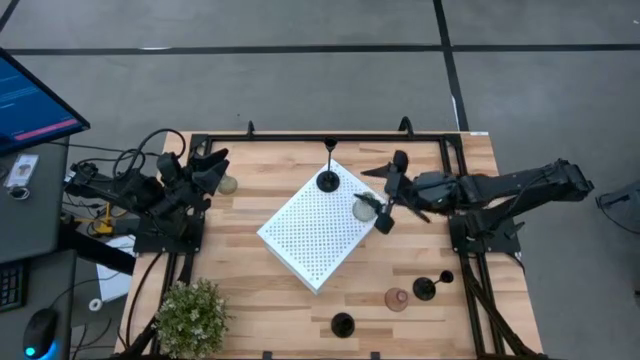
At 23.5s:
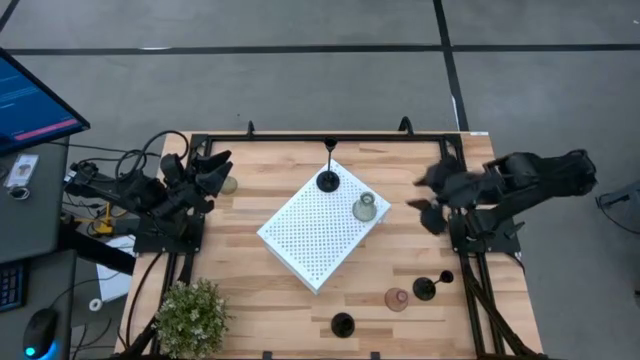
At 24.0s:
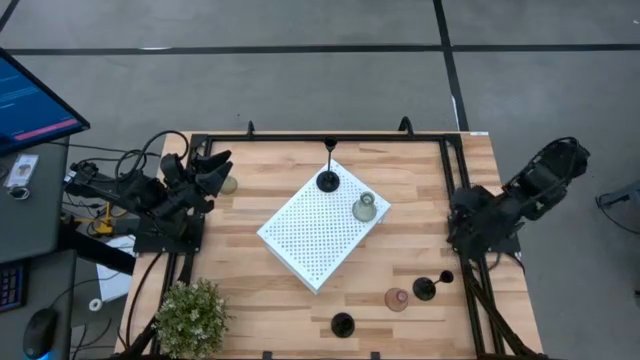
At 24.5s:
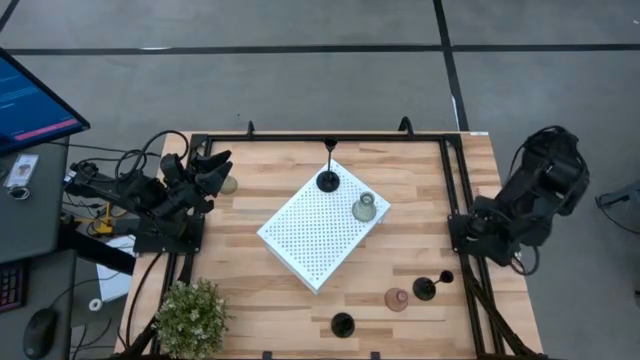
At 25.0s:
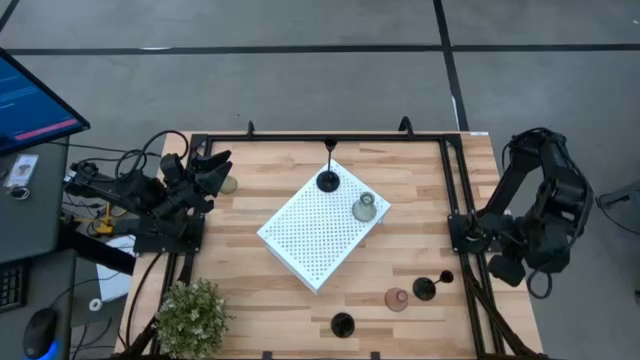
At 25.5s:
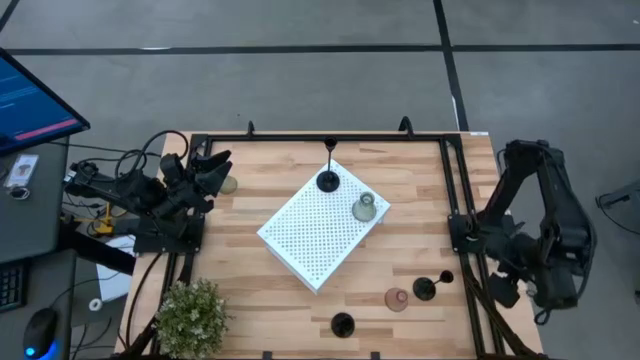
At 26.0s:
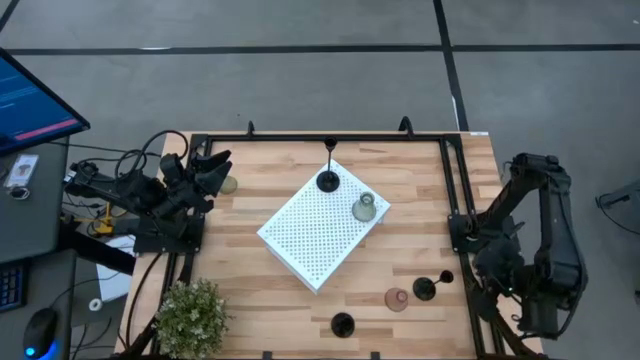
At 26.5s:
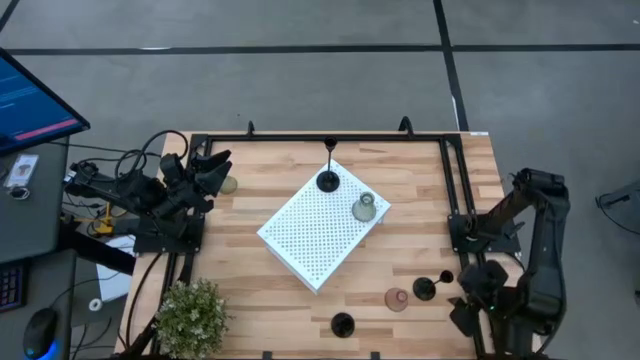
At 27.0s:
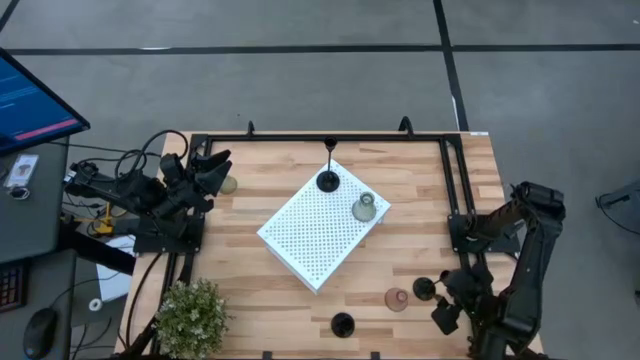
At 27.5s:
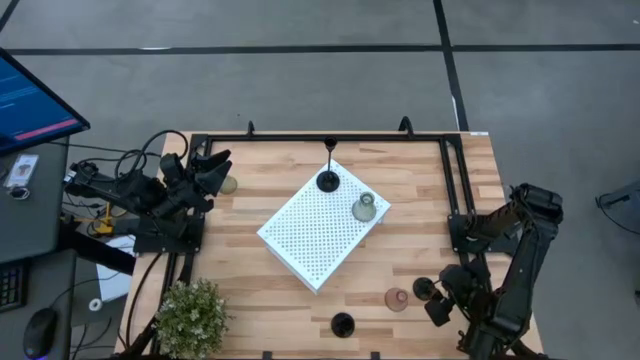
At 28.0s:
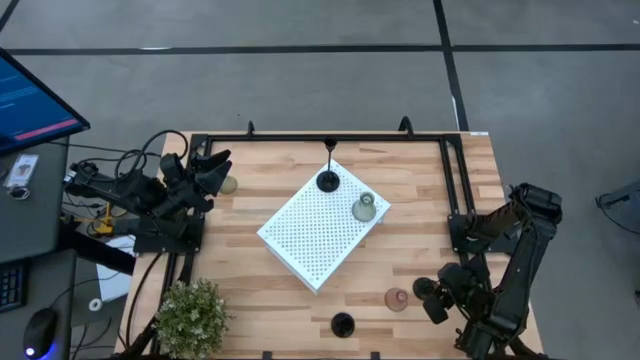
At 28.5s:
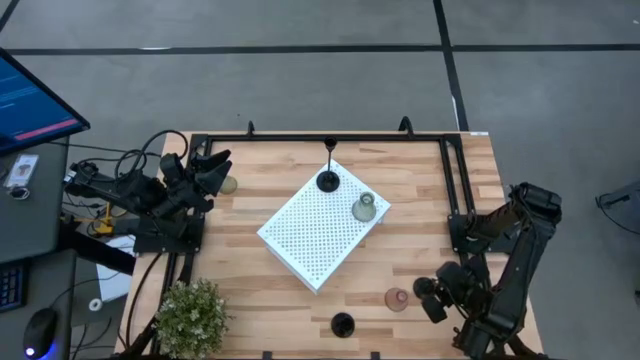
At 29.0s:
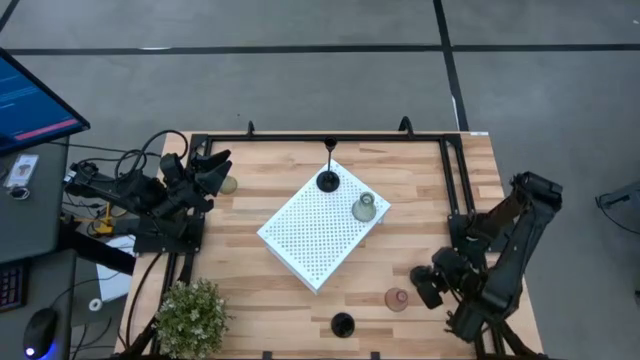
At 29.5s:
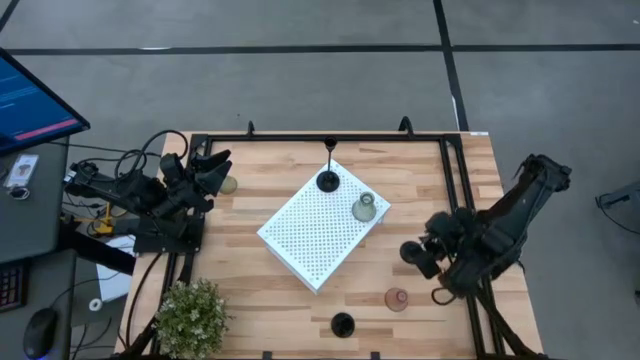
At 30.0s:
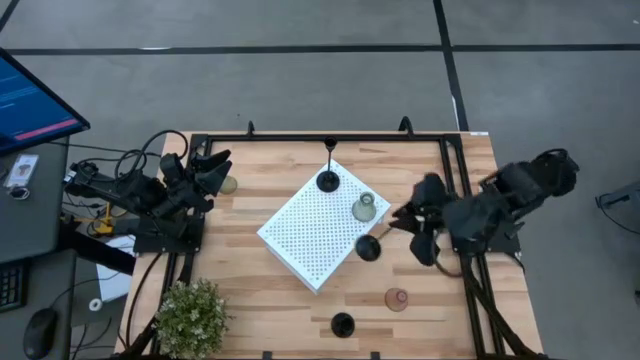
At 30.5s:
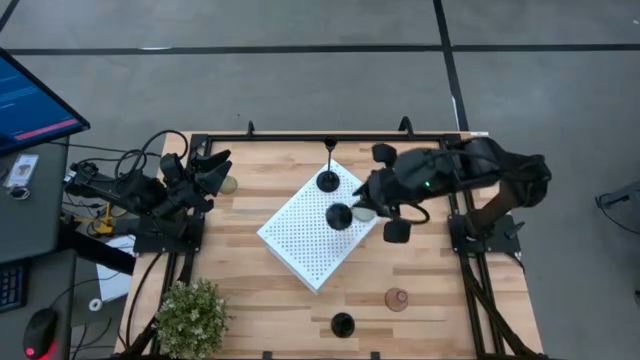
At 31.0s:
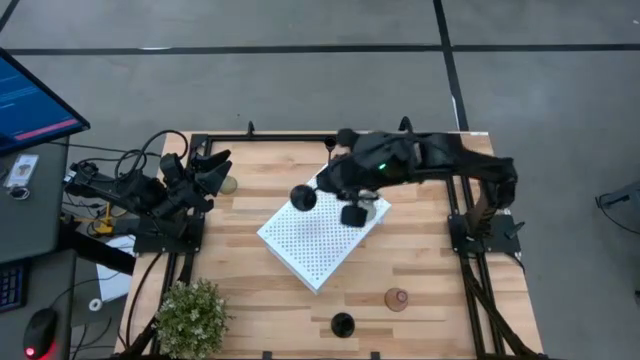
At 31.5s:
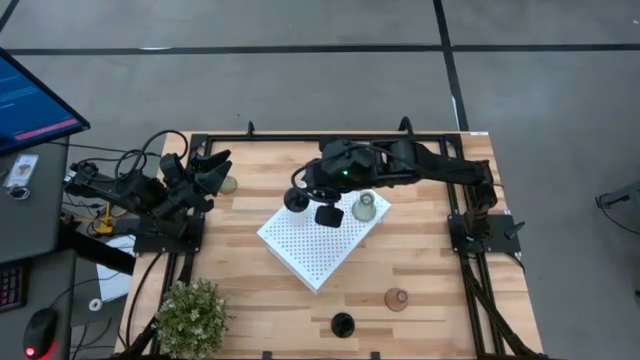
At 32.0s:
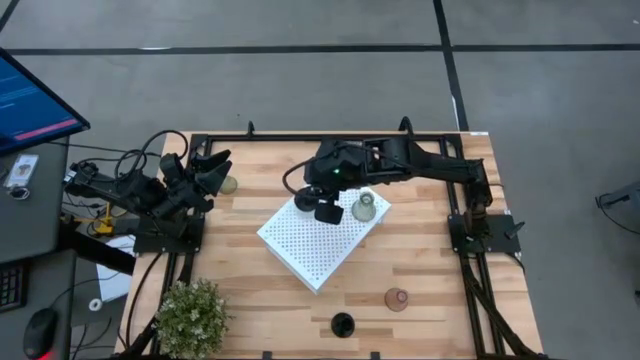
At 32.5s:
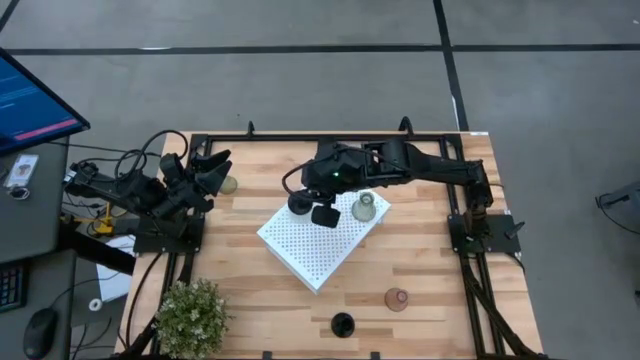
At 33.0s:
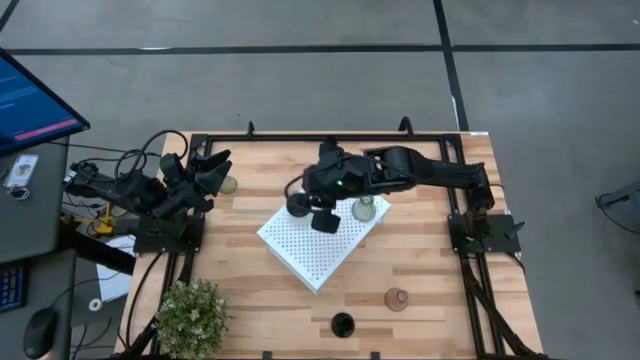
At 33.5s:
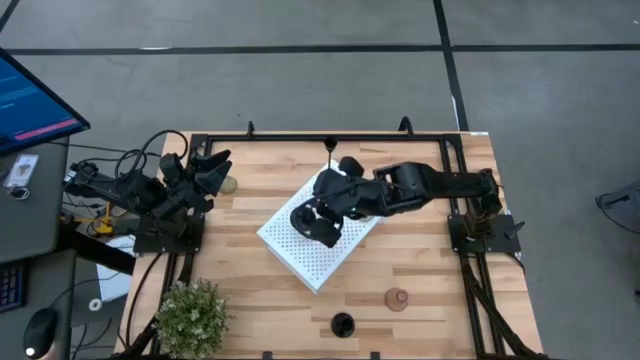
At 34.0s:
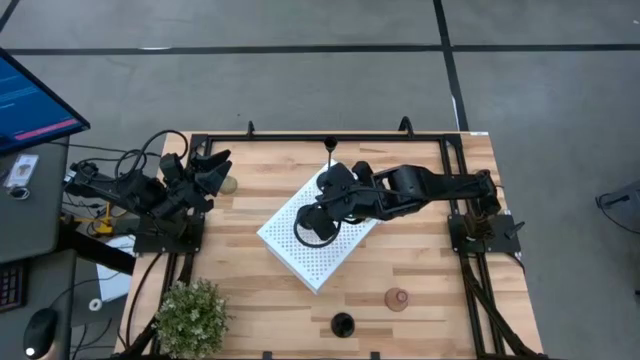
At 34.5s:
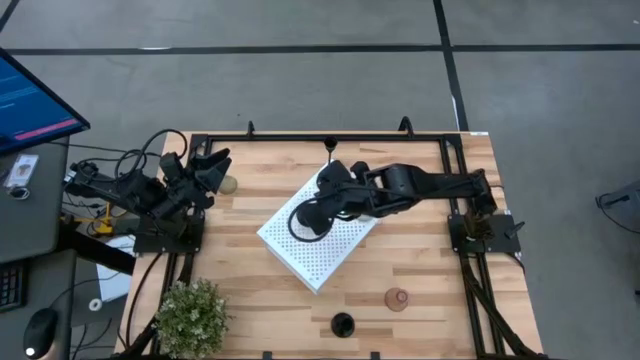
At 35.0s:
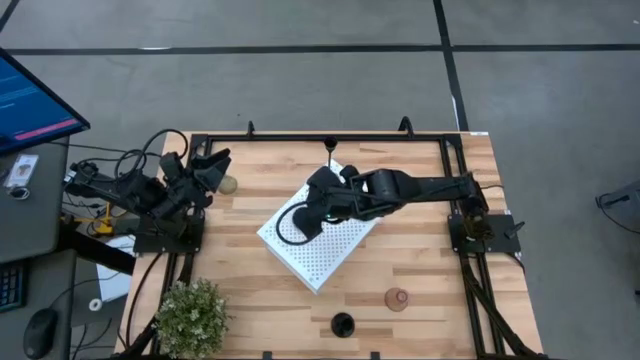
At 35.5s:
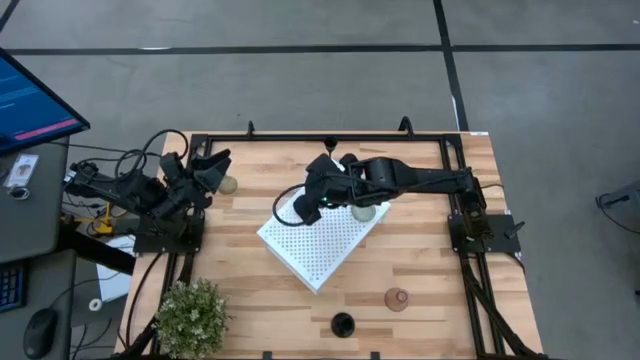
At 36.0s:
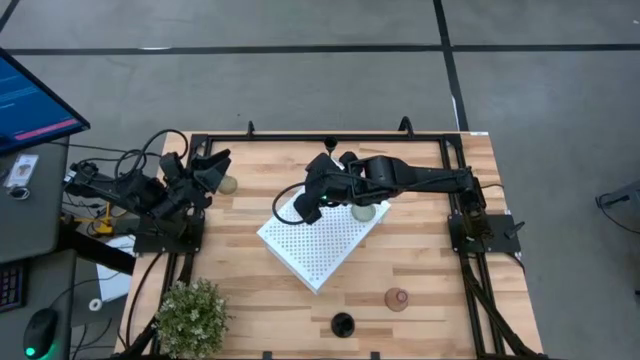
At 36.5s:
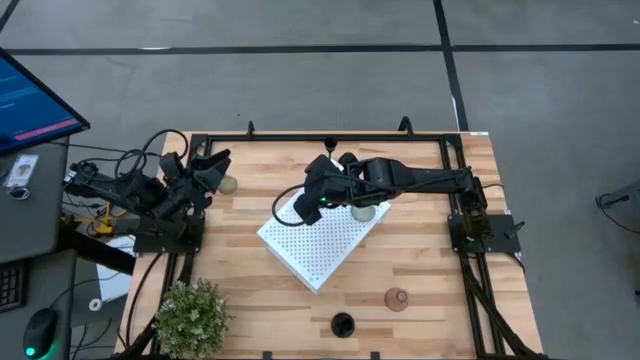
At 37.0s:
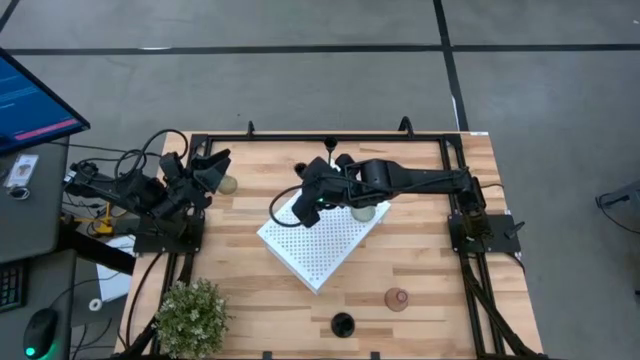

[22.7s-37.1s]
Task: Pick & Place candle stick holders
Put the right black candle holder on the shelf

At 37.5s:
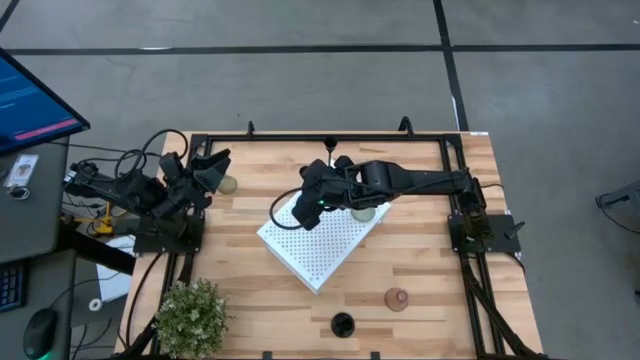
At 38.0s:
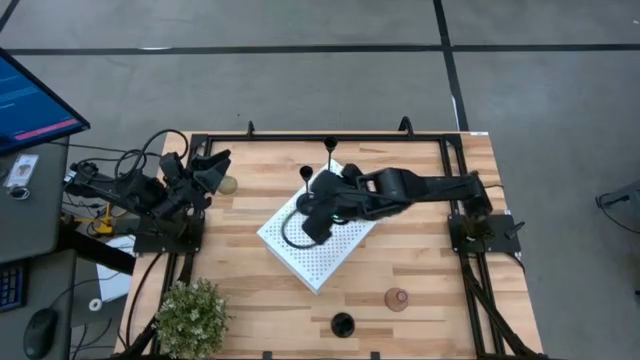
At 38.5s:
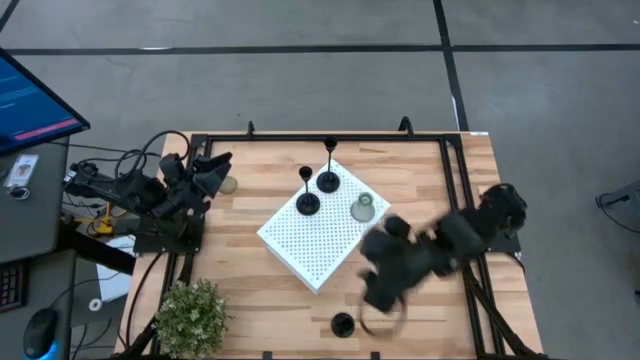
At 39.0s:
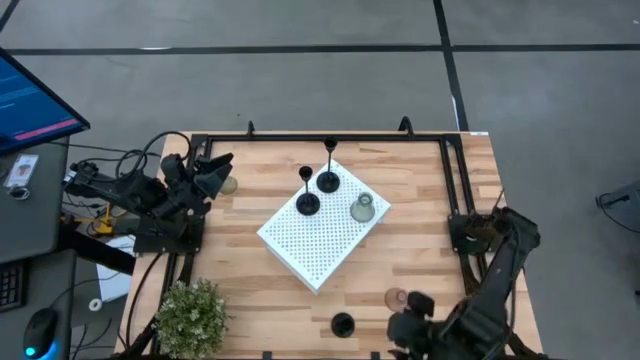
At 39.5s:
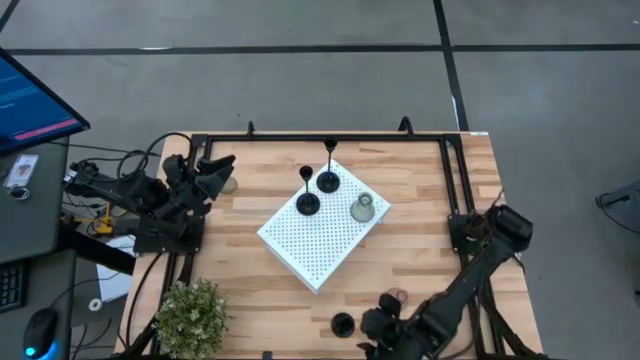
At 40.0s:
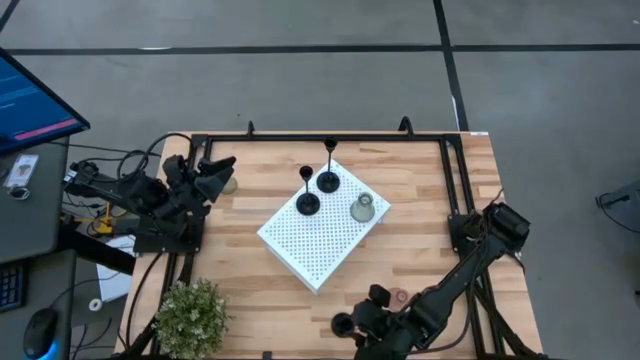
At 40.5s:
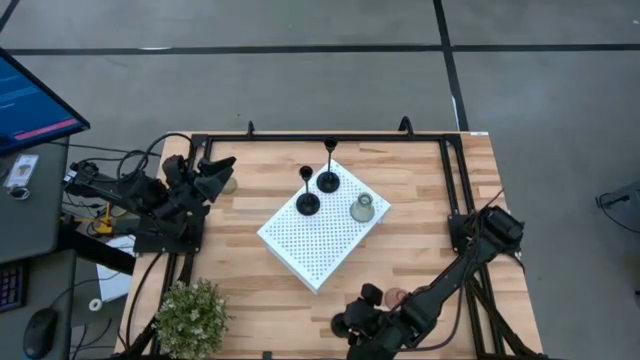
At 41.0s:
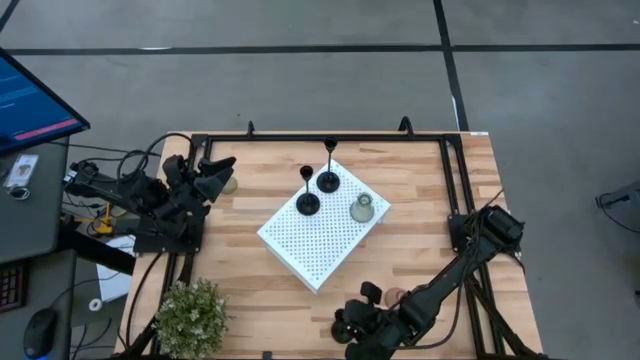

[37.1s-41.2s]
Put the black candle holder on the shelf

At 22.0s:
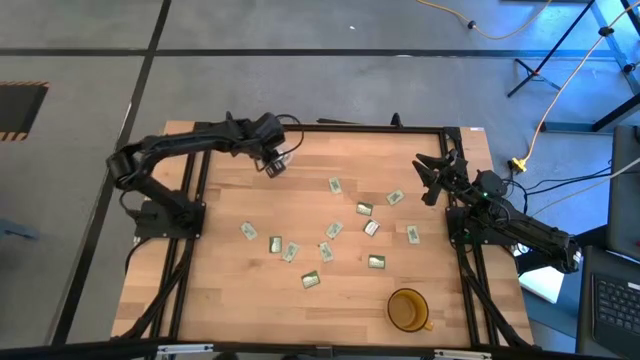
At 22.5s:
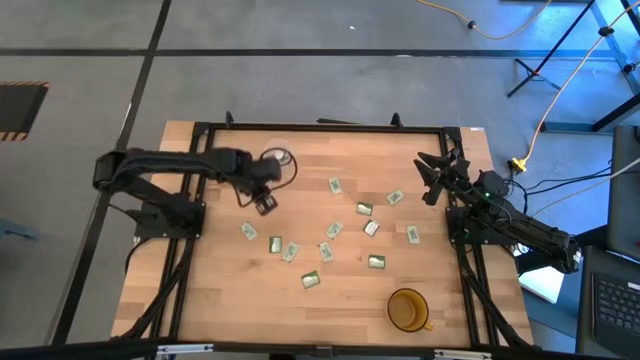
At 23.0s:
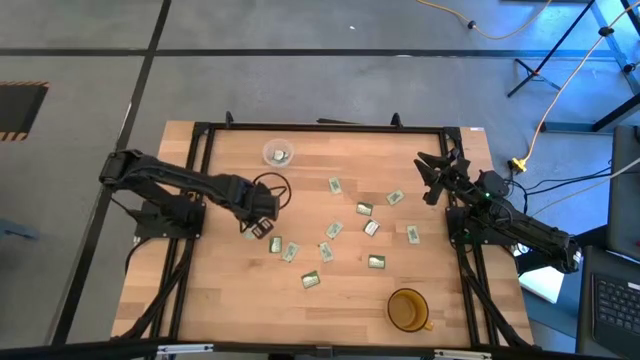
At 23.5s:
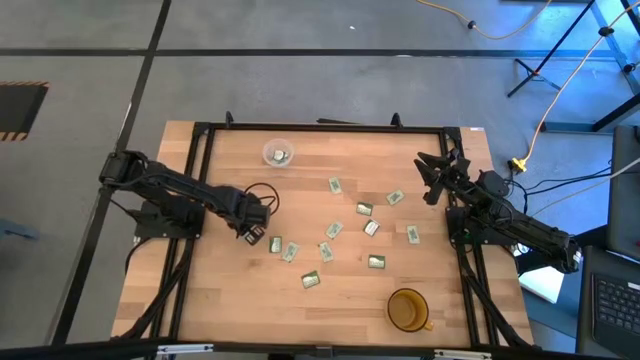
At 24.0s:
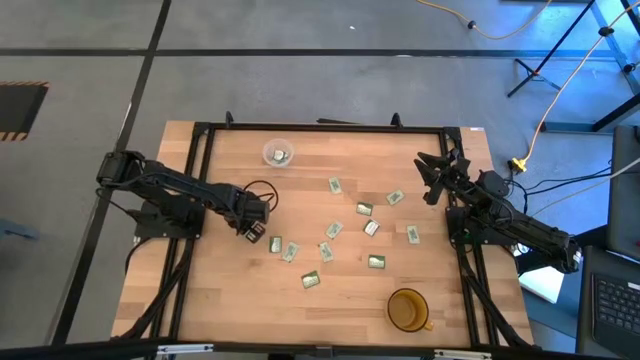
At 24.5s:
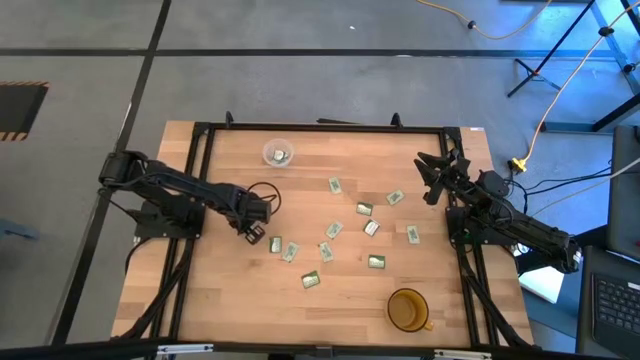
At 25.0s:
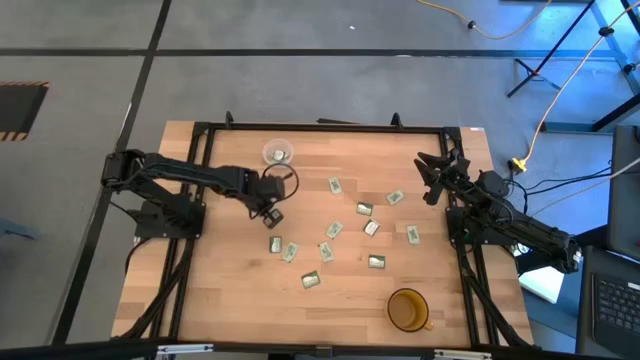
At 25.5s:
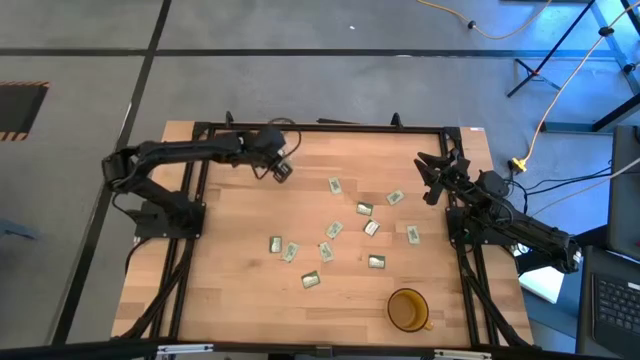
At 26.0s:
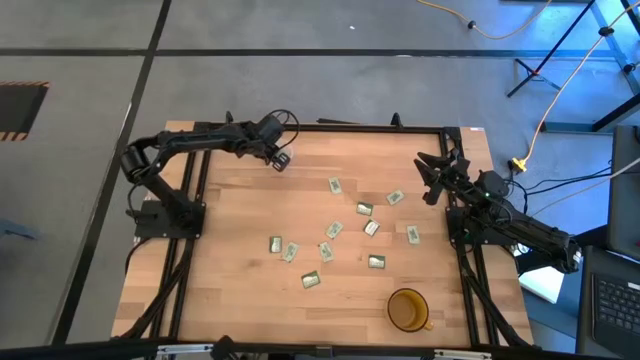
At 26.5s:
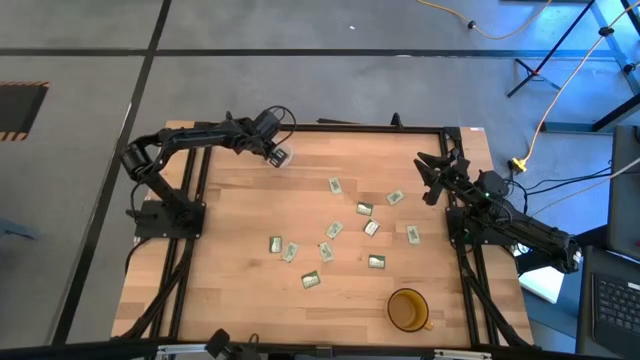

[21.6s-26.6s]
Task: Pick and place Stevia / Truvia into bins
Put the stevia packet into the transparent container
